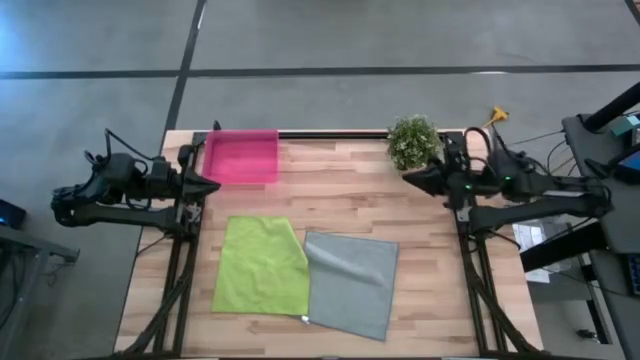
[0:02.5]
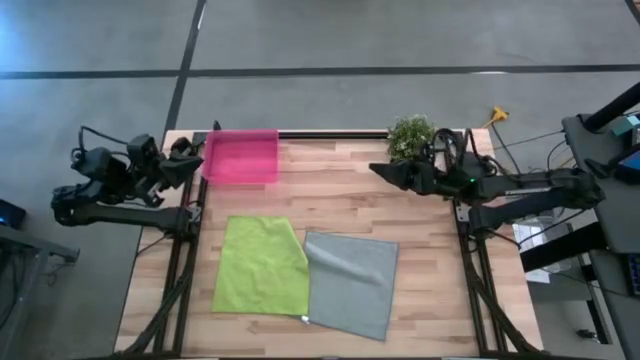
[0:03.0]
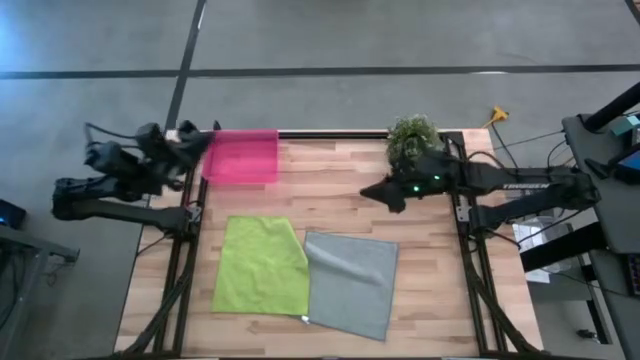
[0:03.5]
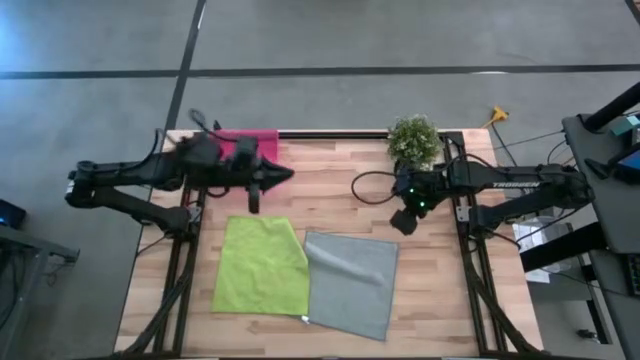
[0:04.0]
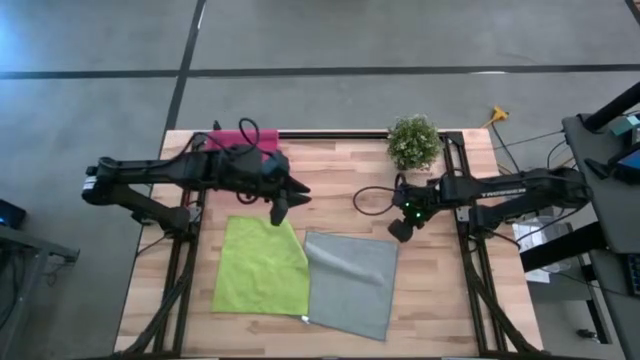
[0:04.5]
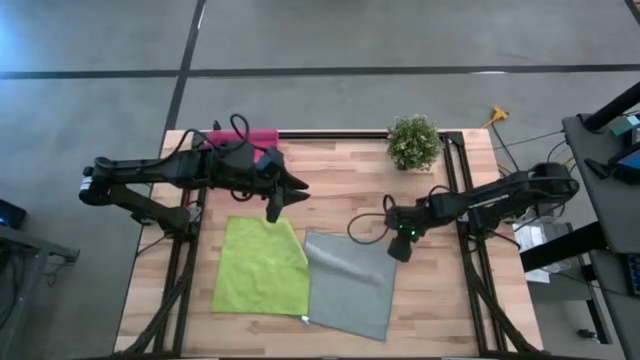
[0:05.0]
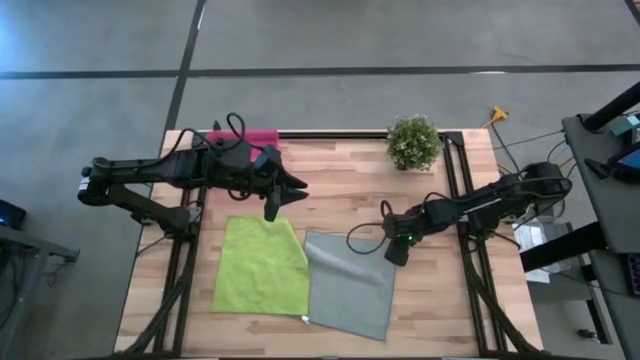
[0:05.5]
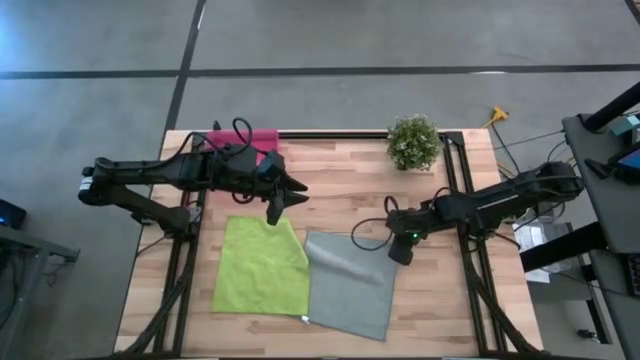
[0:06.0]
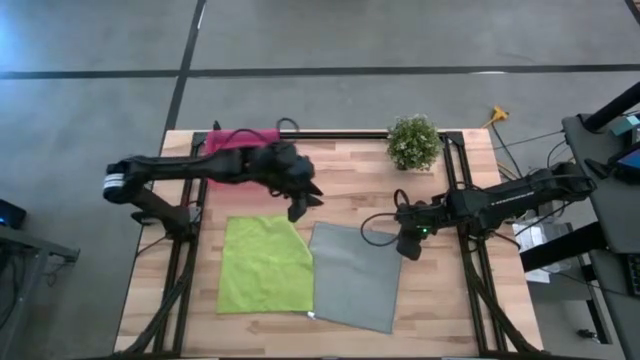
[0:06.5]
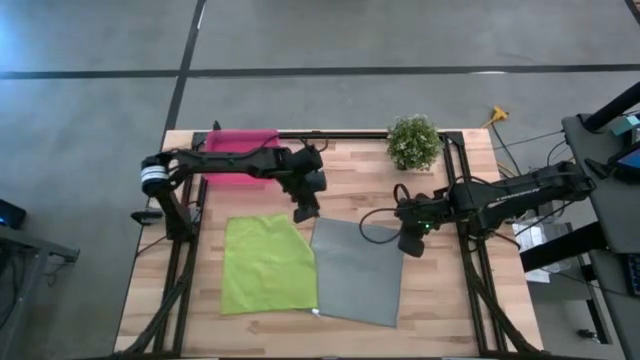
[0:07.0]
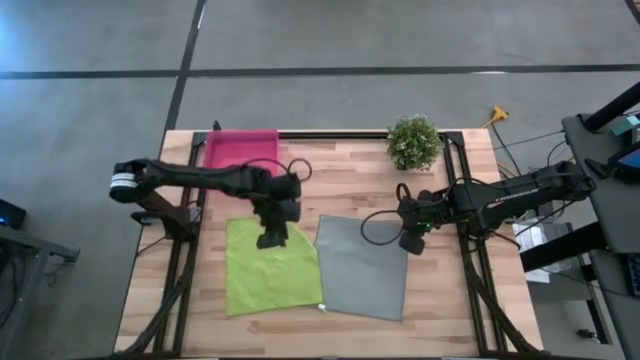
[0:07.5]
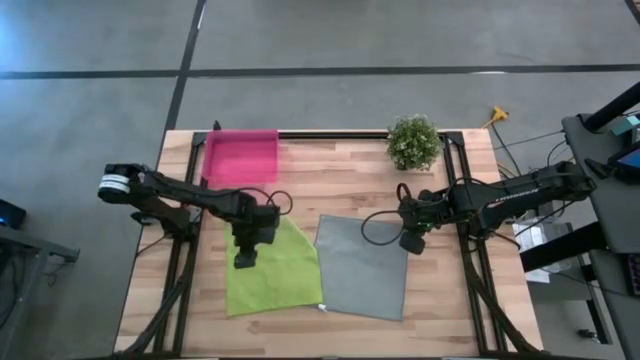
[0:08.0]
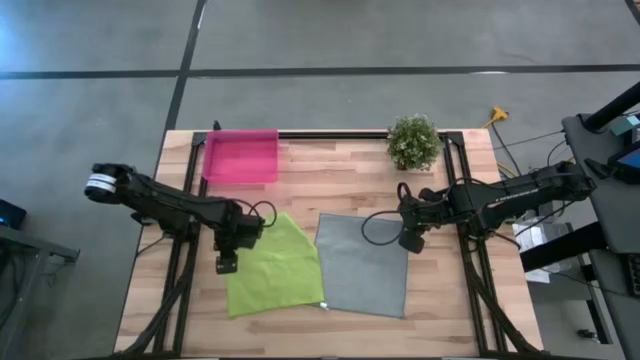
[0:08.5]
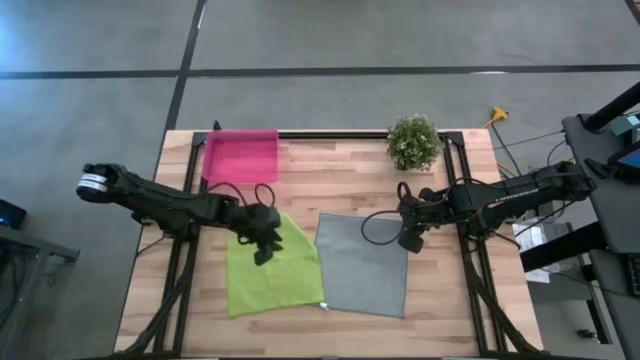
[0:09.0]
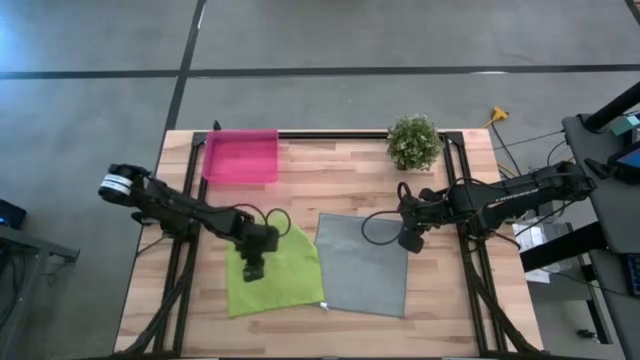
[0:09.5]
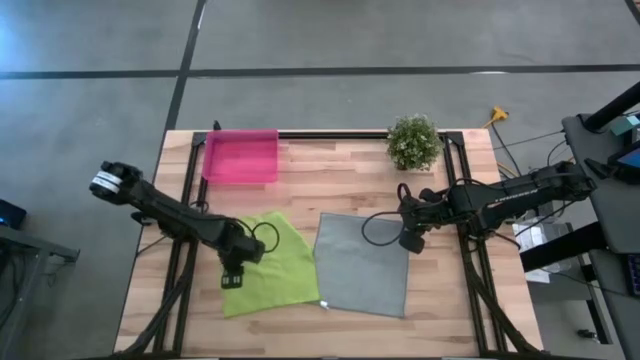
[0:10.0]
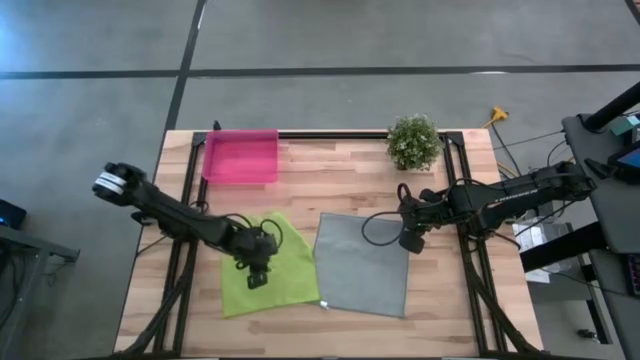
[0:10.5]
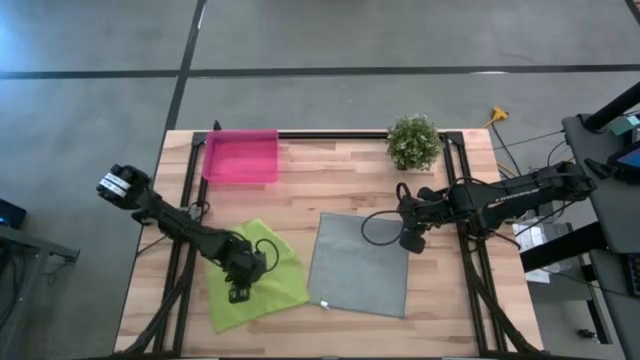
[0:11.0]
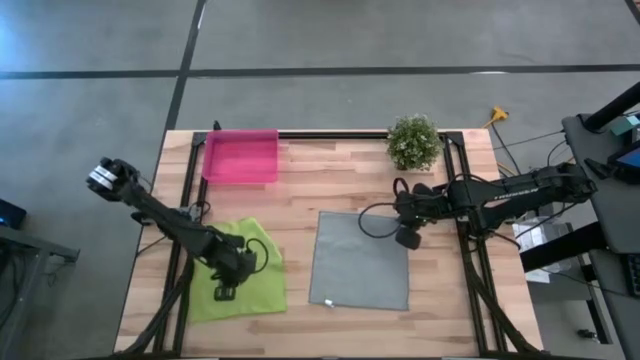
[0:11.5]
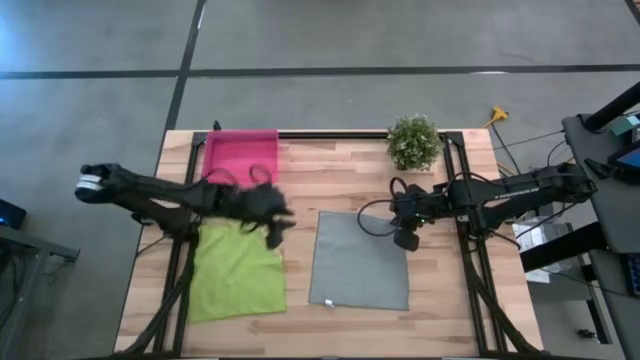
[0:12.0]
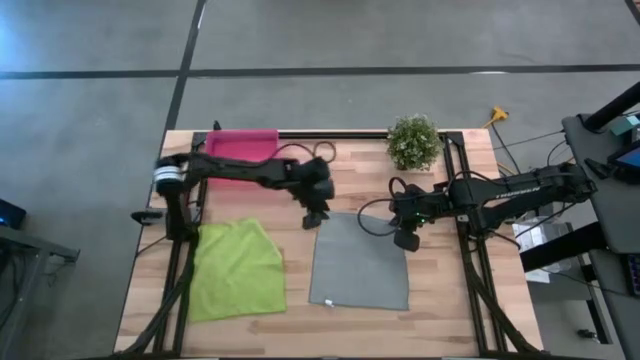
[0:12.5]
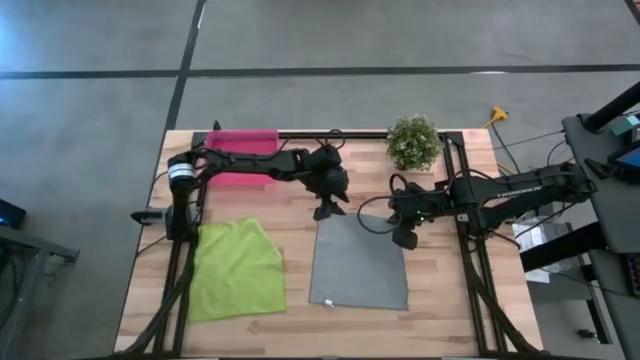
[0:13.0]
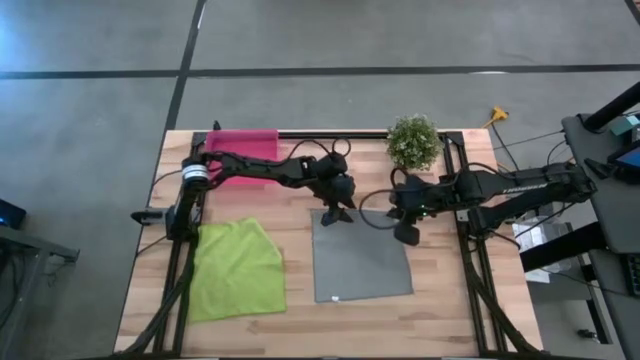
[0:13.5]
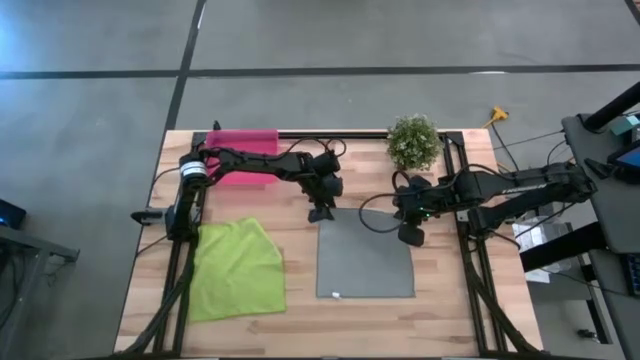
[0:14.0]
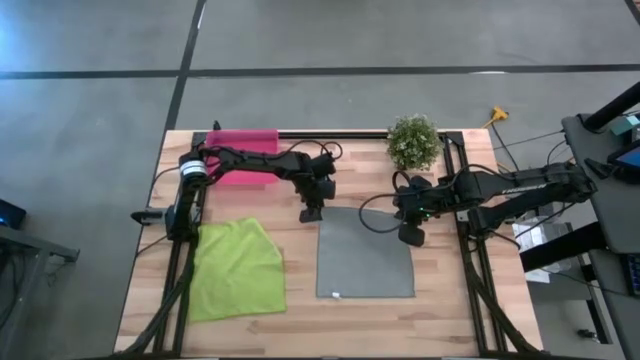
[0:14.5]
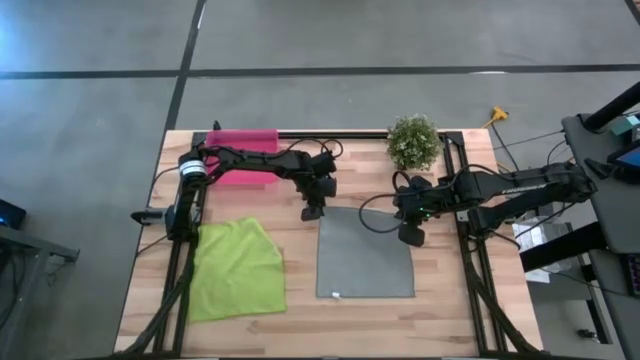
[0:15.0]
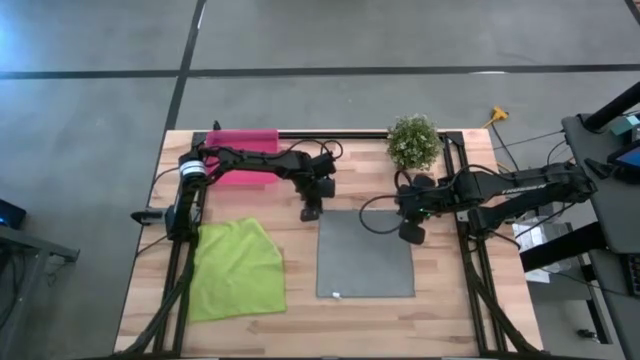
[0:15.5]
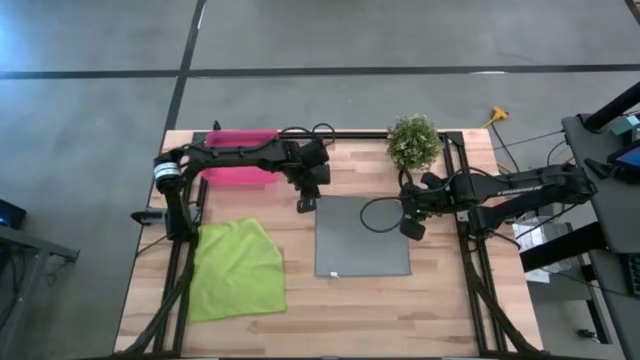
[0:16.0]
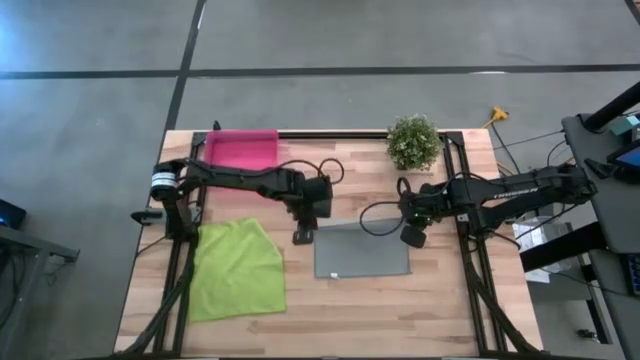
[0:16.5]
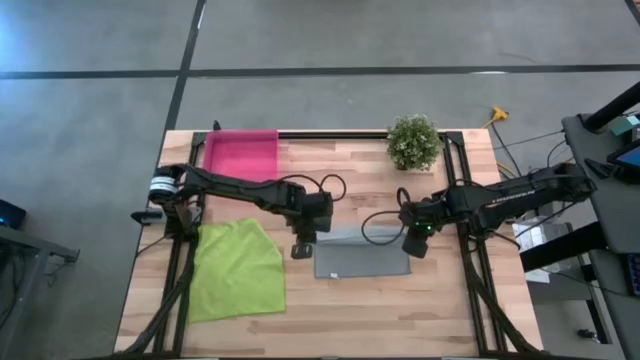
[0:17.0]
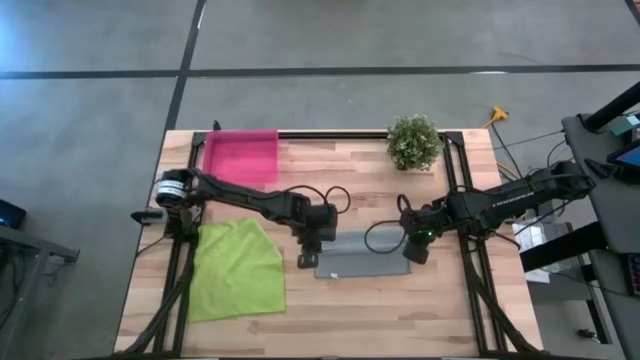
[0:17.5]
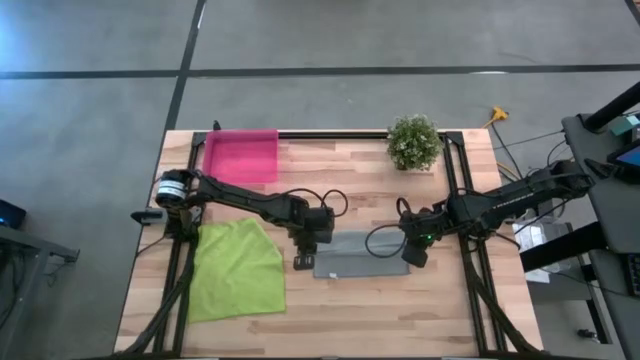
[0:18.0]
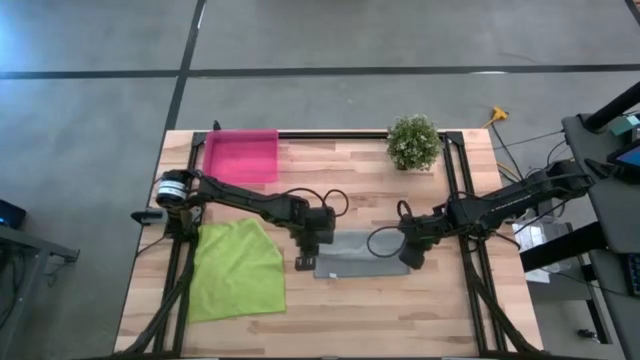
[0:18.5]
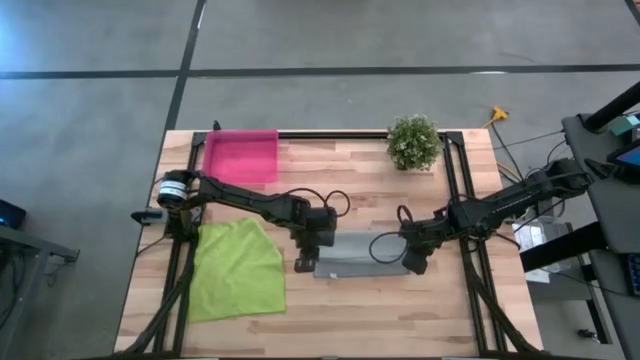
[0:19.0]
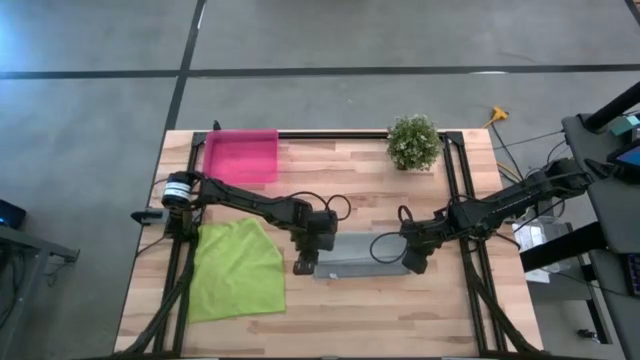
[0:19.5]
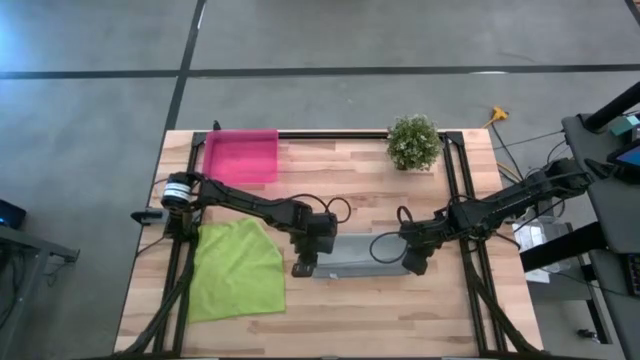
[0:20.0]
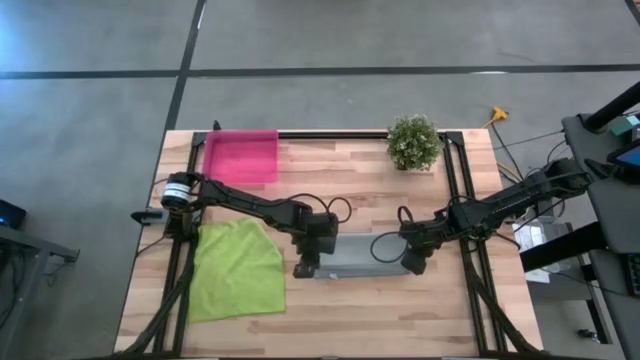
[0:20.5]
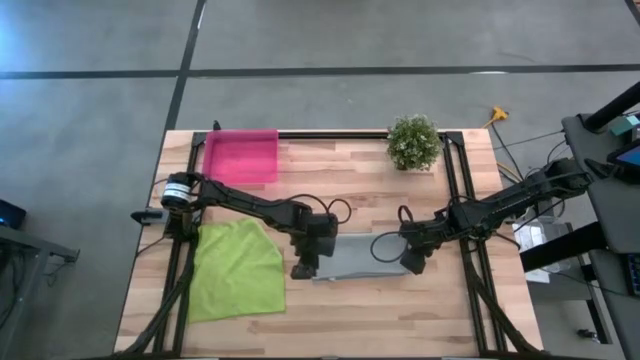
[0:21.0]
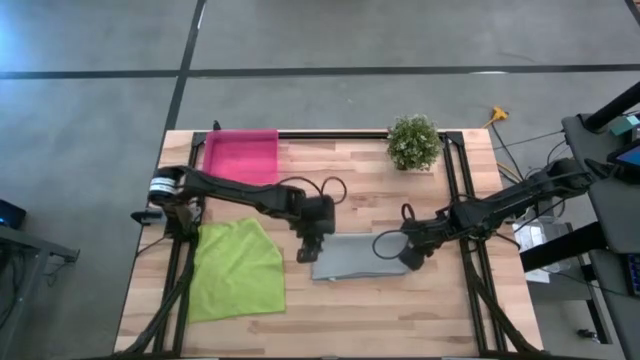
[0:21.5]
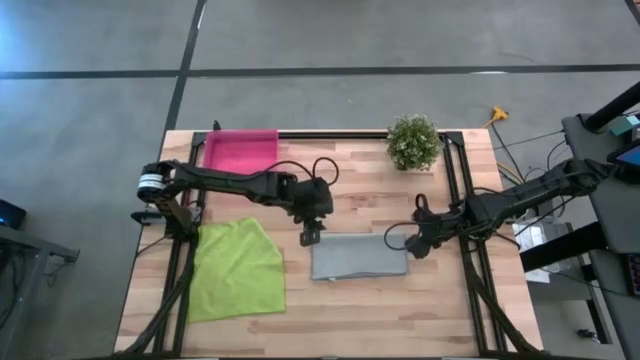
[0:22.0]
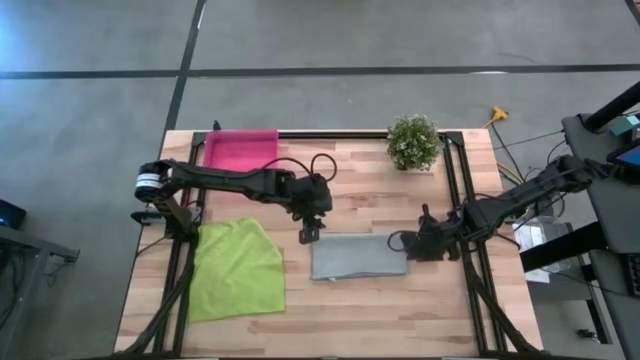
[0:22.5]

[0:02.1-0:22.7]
Task: Roll microfiber towels into tight, uniform cylinder then place into a basket
Roll the blue microfiber cloth
